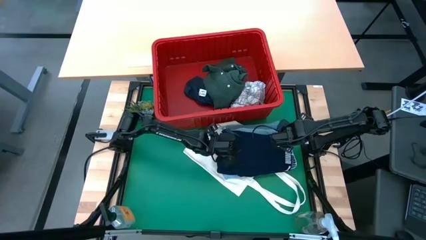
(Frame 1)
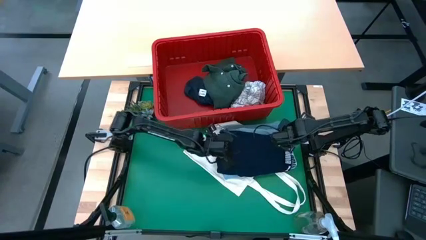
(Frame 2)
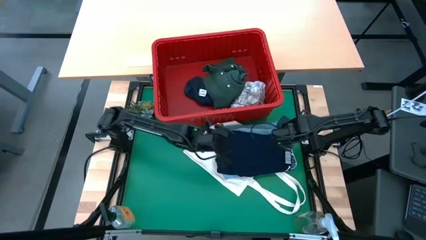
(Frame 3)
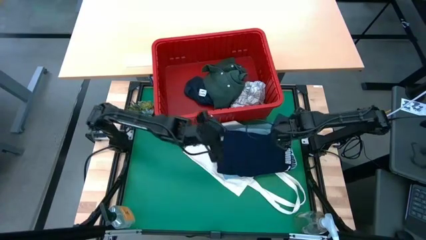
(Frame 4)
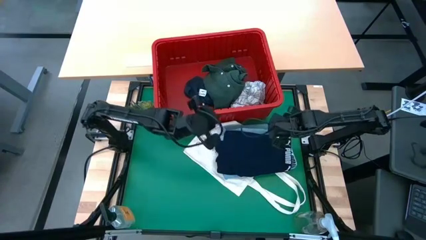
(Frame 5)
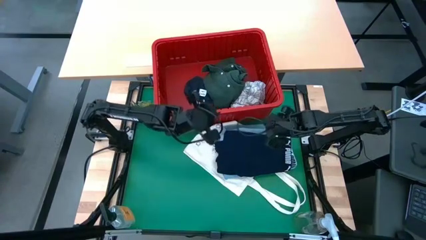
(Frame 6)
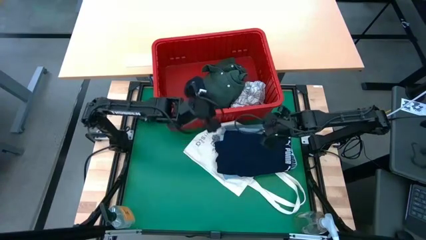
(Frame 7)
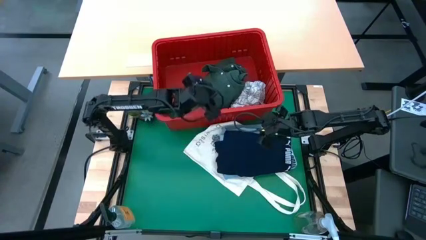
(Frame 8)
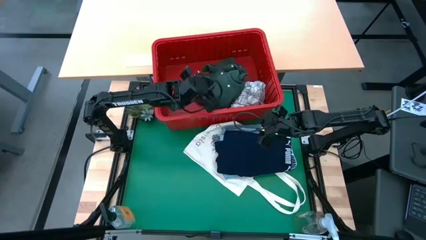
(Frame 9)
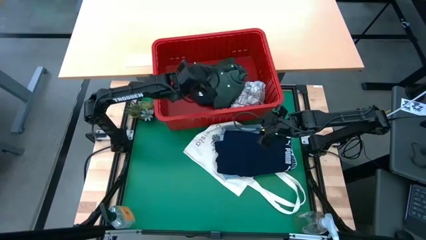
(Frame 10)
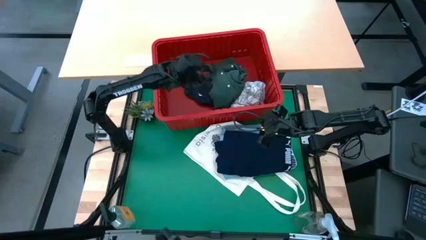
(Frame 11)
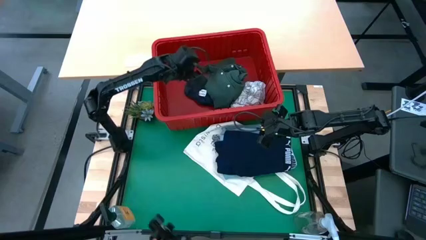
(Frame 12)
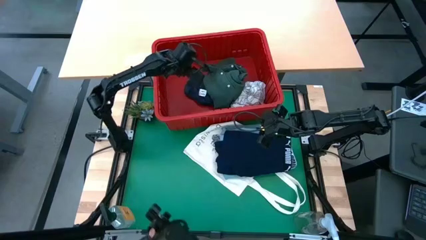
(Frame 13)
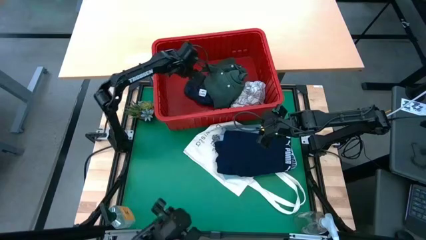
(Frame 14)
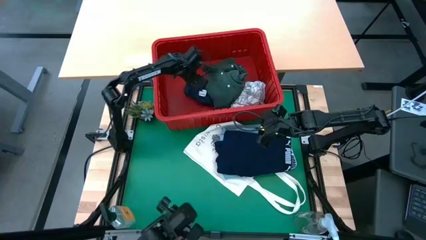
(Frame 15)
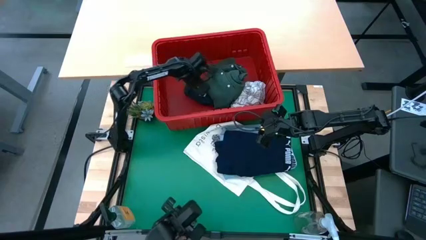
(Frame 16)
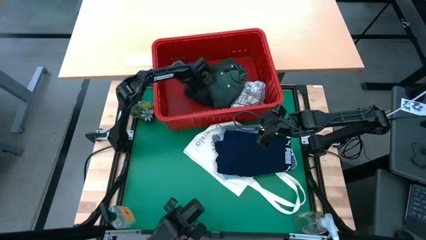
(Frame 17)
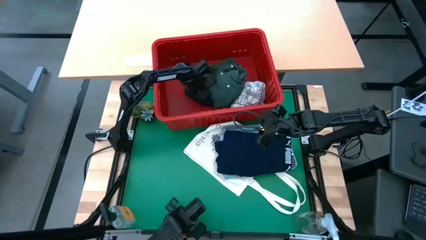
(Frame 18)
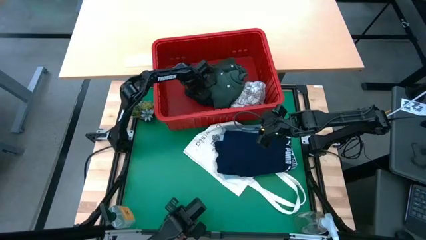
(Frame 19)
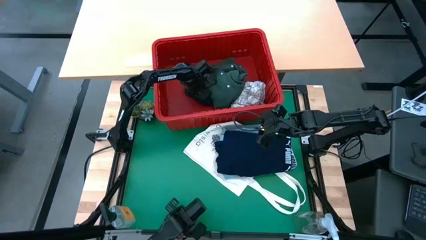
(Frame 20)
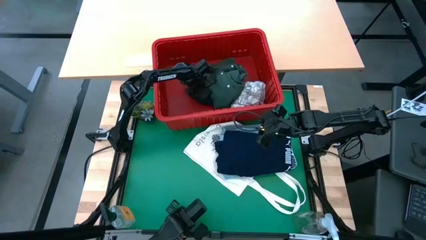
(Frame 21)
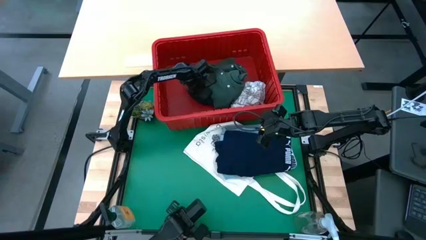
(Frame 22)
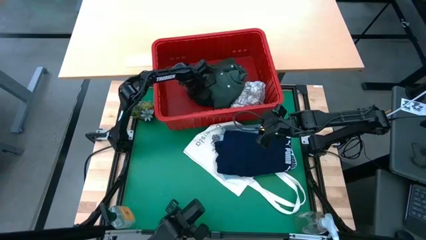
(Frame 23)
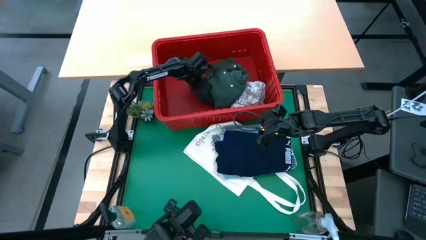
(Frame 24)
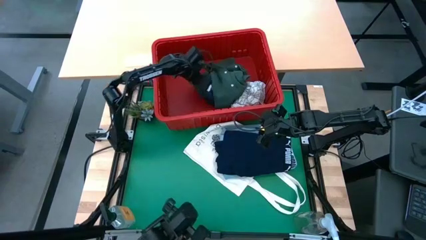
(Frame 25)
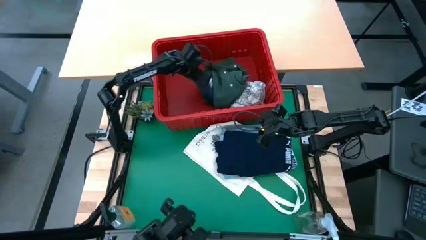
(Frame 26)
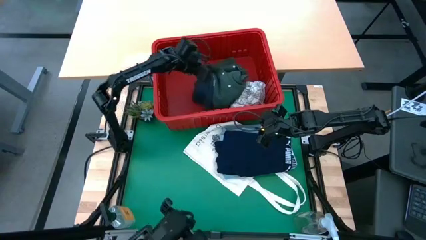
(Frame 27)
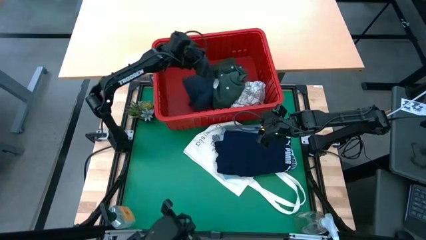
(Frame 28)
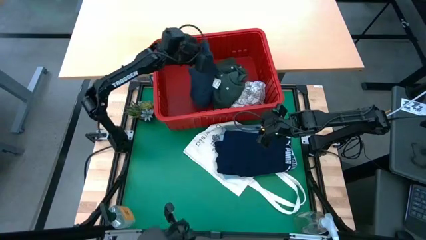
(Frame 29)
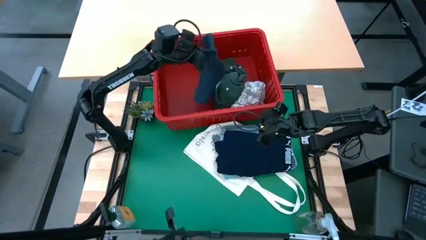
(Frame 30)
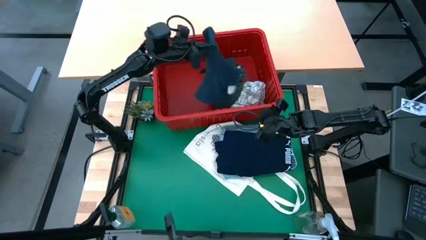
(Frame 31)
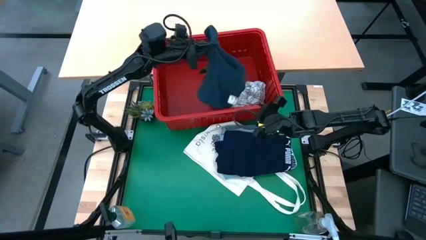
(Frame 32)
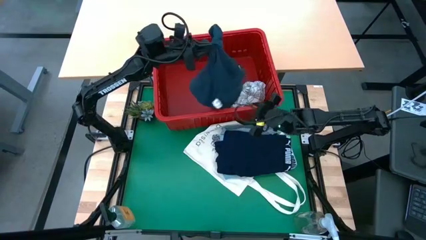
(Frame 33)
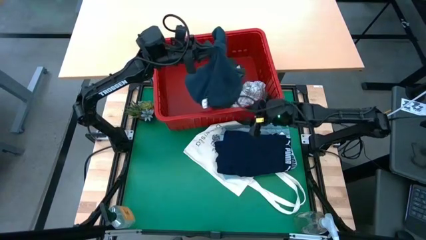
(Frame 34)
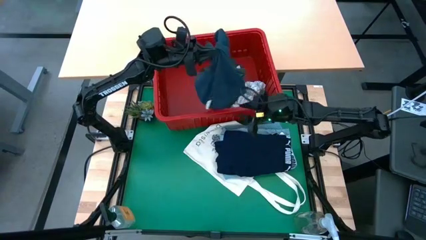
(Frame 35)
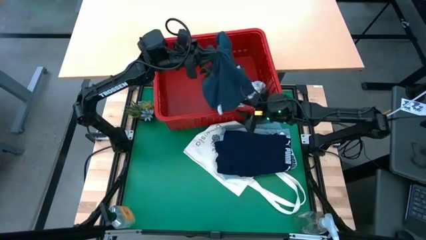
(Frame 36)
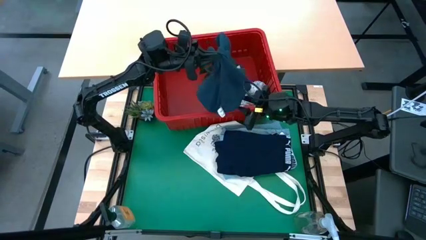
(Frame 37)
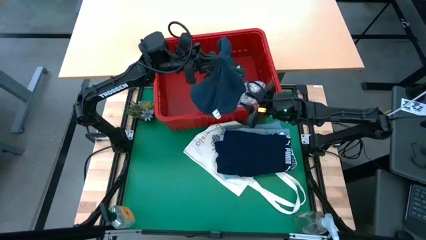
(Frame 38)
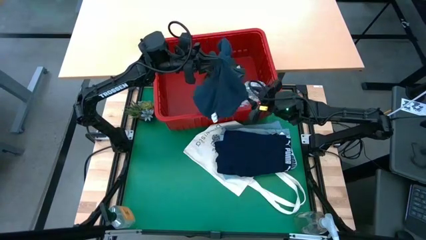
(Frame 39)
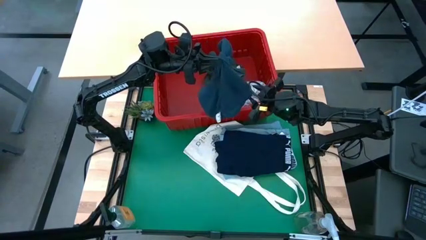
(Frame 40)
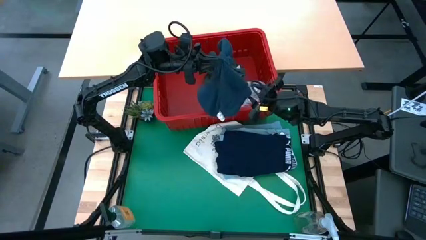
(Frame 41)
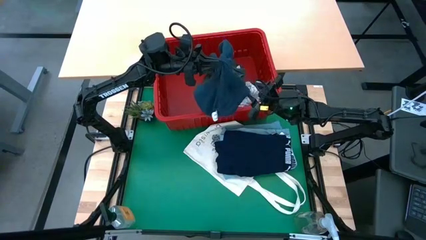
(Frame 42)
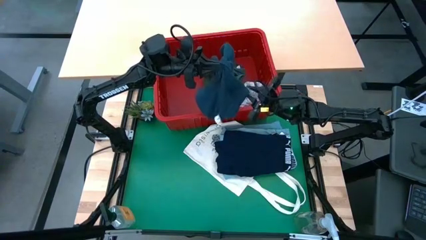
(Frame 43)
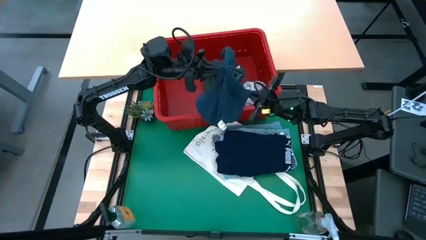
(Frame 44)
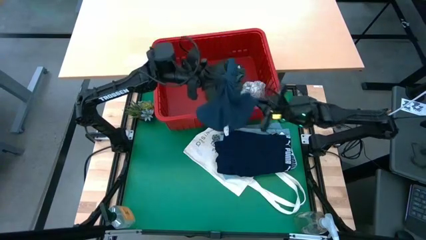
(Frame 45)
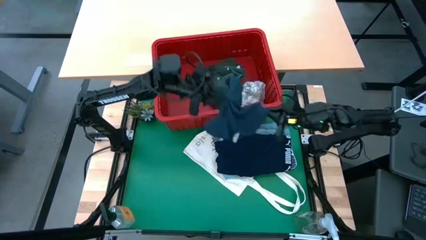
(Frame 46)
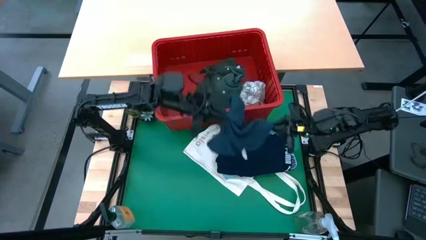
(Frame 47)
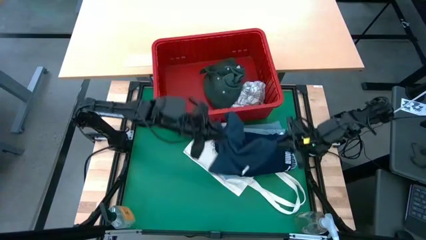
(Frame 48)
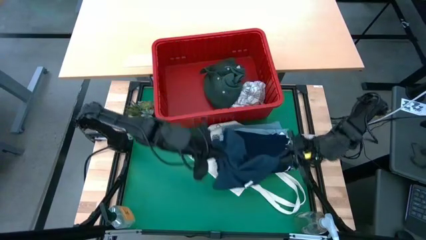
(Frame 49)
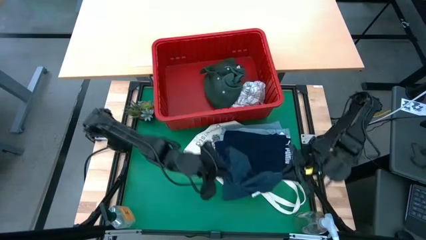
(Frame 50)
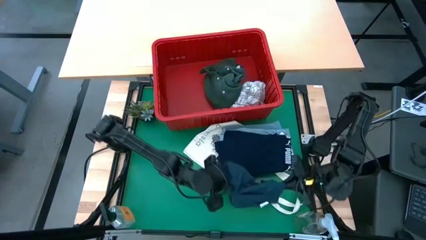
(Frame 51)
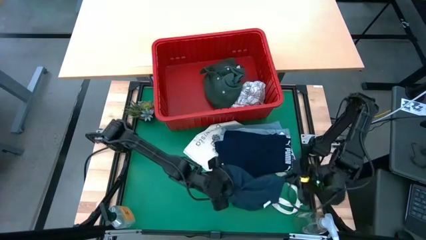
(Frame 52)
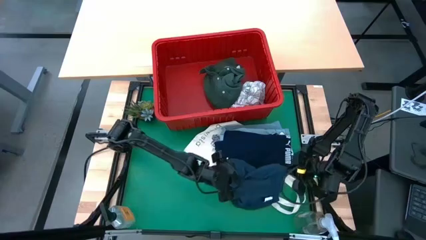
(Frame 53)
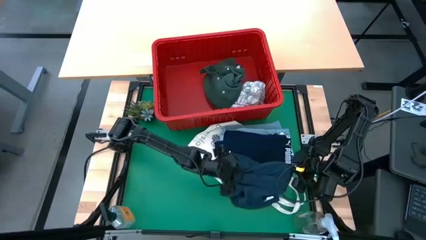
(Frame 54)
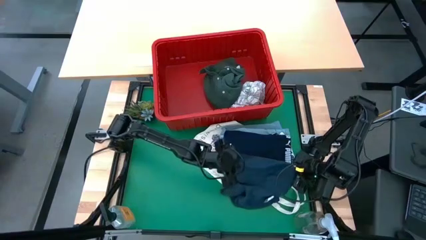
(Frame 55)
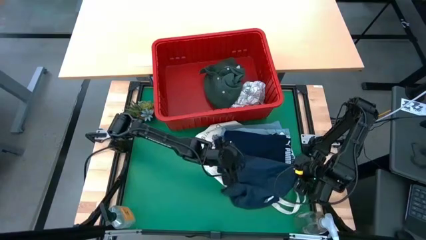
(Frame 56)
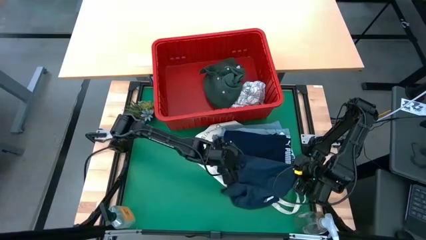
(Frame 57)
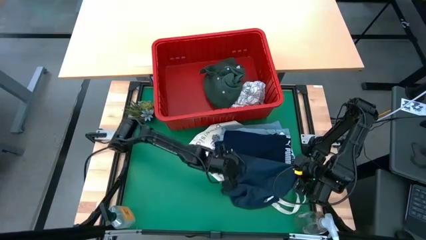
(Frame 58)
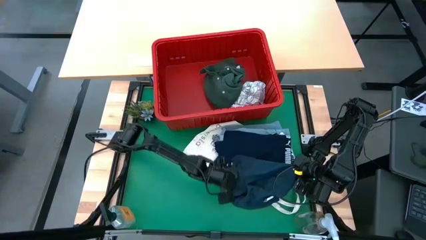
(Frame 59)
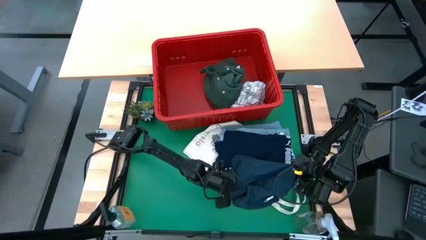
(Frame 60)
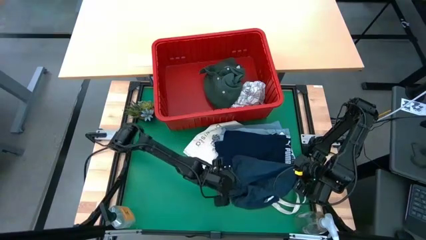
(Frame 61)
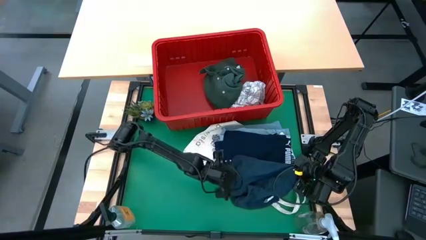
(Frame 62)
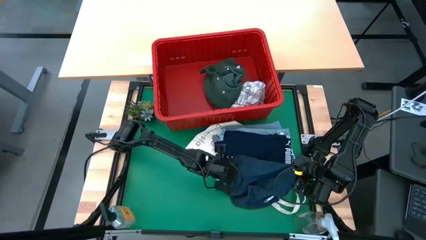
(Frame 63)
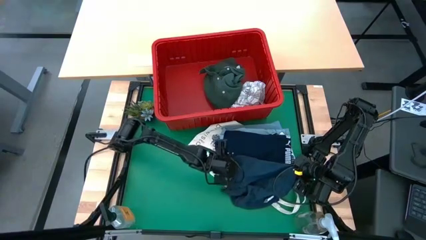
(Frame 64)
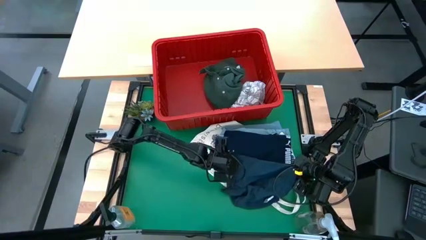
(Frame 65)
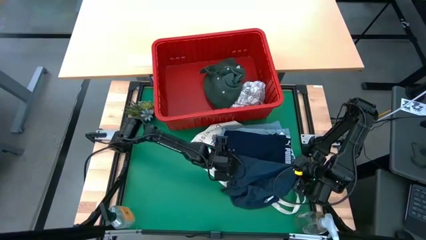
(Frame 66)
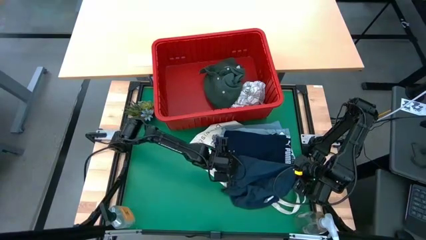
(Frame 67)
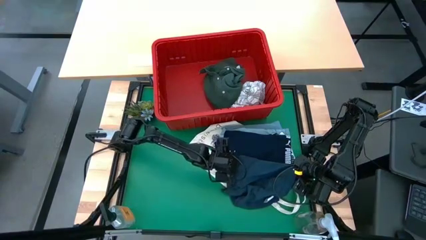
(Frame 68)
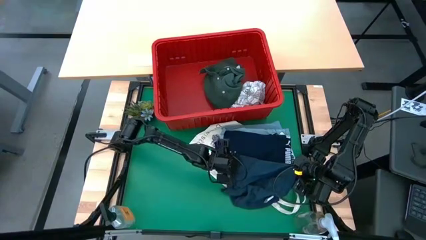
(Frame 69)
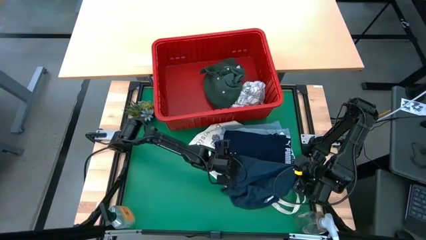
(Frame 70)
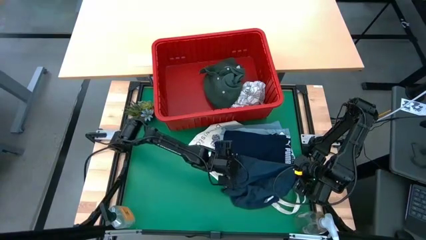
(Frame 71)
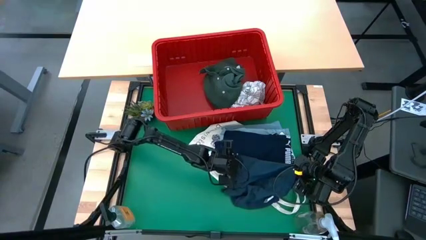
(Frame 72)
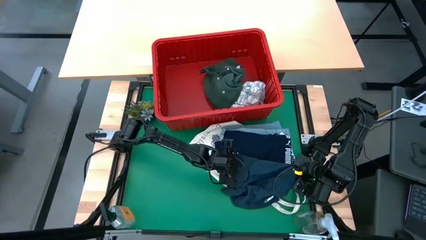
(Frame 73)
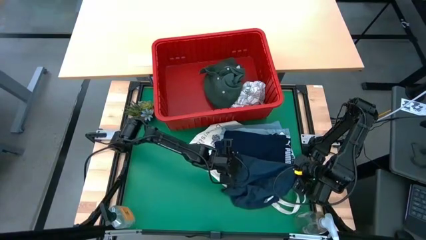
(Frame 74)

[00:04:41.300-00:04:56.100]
Task: Fold laundry
Fold the gray shorts

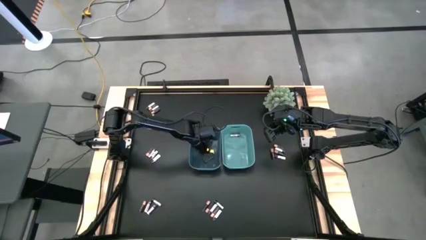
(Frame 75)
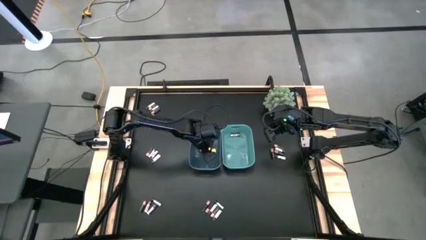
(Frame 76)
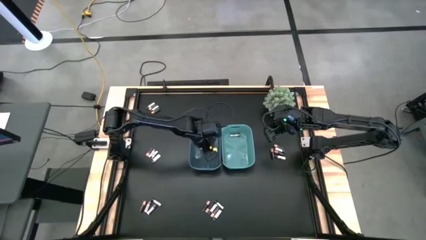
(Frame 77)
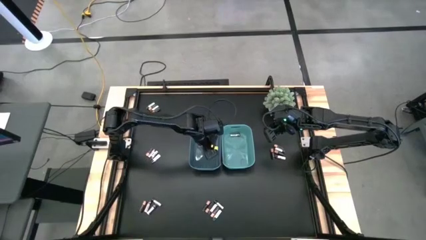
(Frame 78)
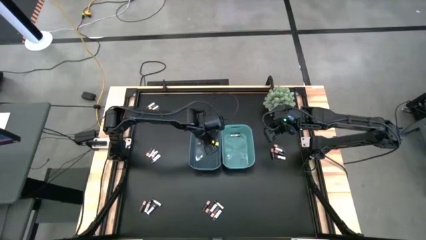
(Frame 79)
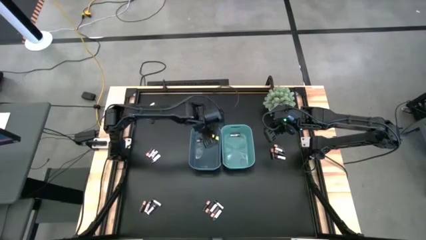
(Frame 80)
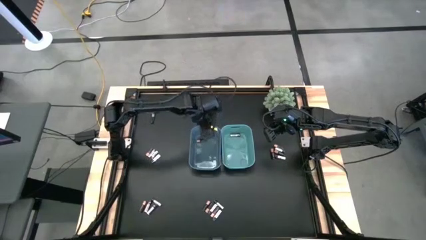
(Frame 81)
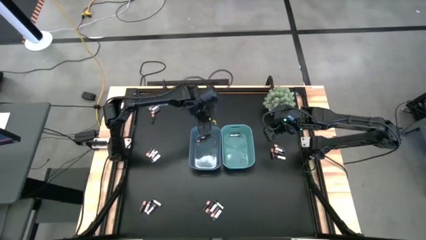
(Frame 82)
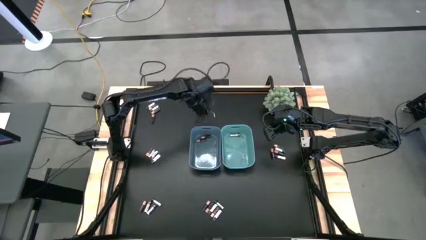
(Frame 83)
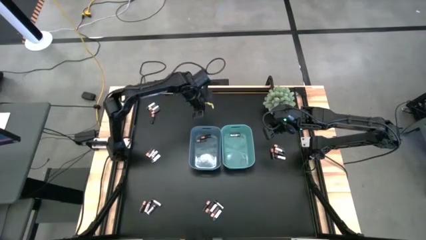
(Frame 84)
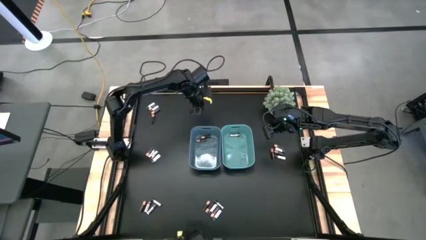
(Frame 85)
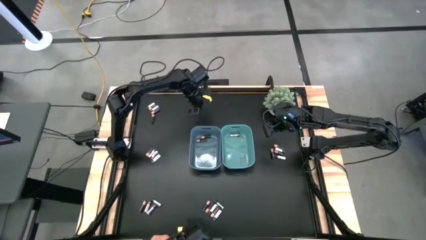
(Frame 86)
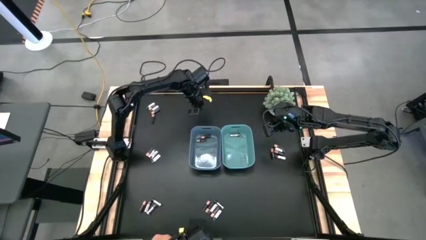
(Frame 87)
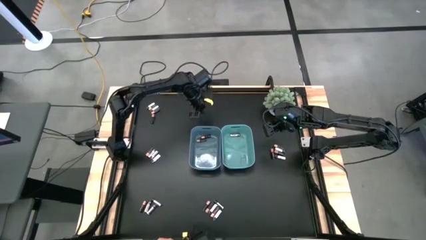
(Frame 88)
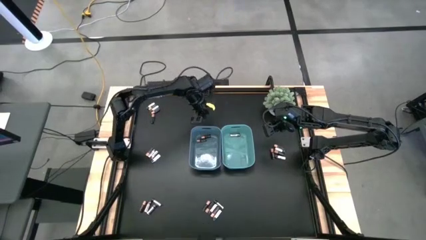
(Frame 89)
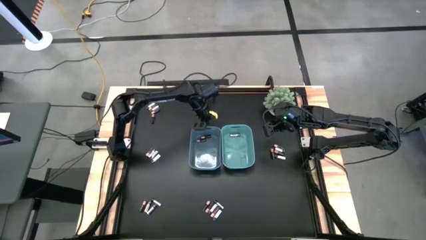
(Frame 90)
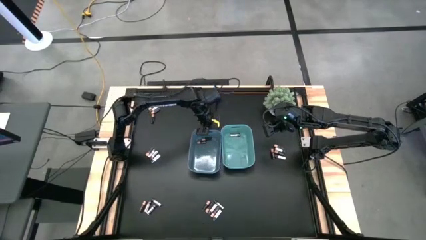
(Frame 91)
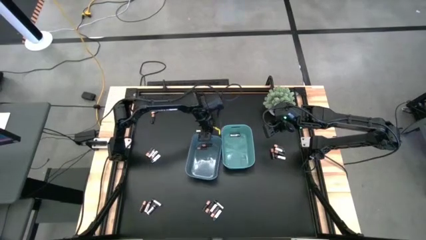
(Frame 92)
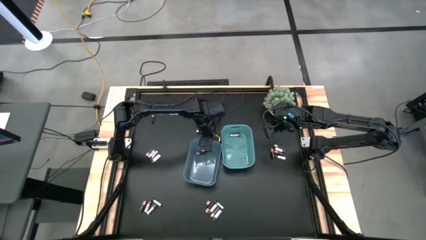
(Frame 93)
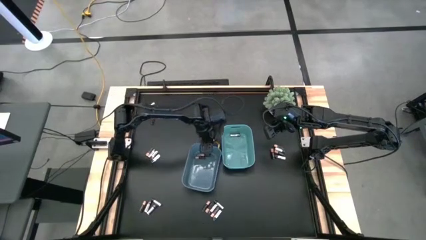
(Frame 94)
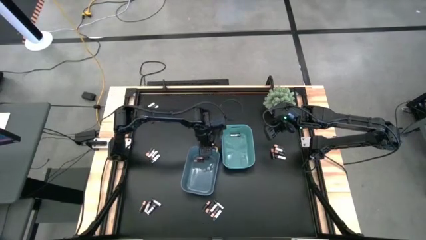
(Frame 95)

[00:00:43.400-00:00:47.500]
Task: Sort batteries
Adjust the blue bin
